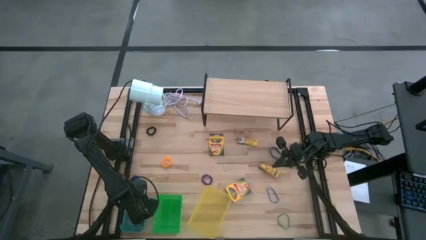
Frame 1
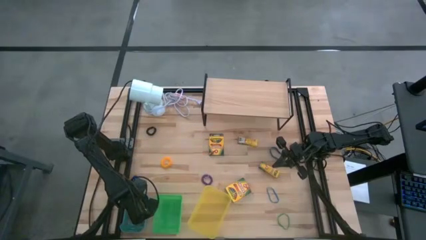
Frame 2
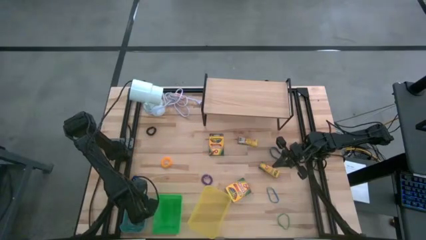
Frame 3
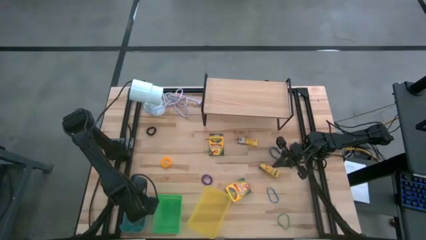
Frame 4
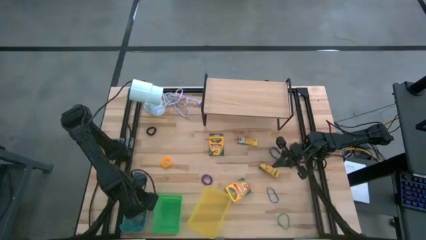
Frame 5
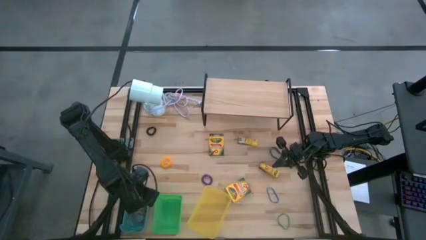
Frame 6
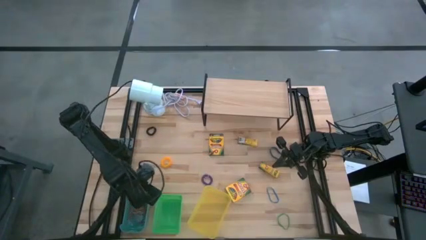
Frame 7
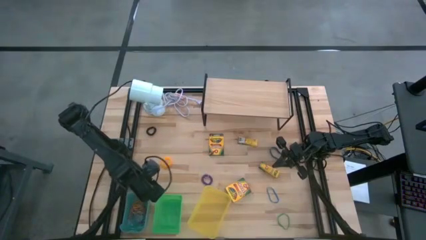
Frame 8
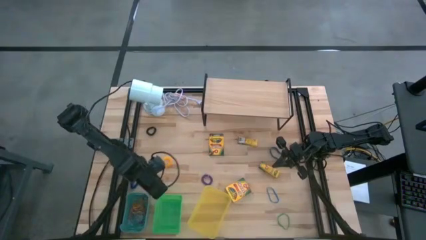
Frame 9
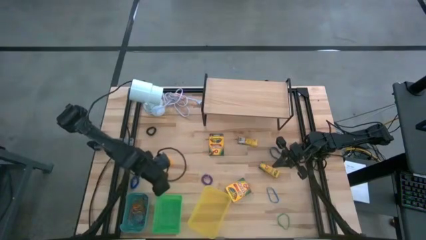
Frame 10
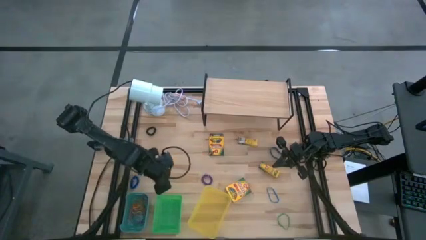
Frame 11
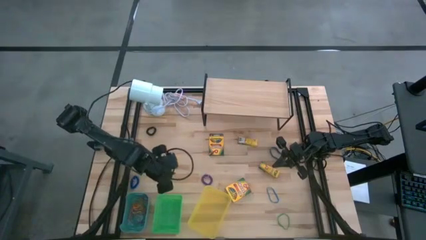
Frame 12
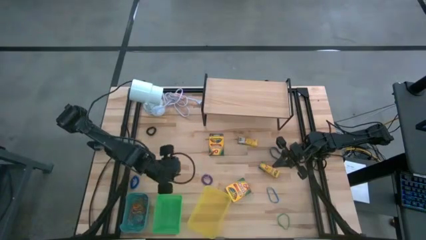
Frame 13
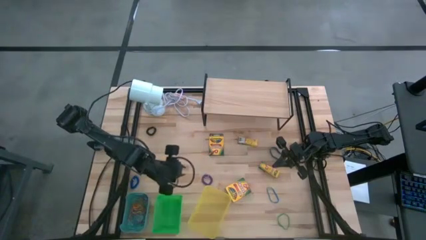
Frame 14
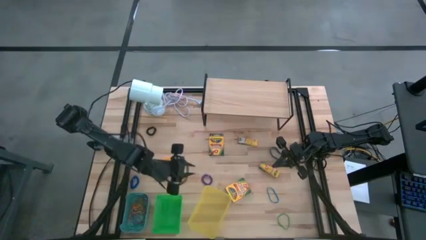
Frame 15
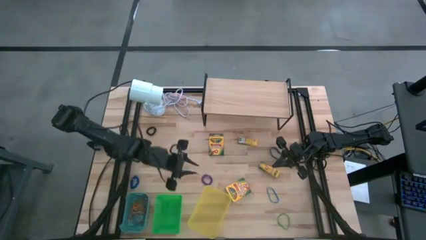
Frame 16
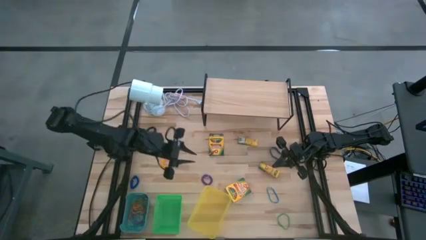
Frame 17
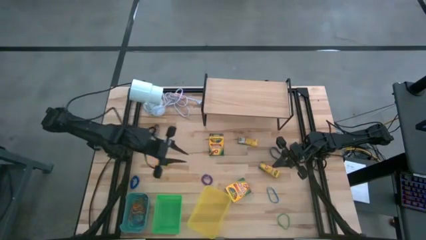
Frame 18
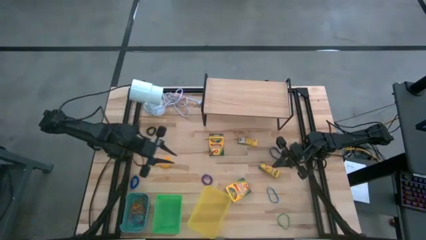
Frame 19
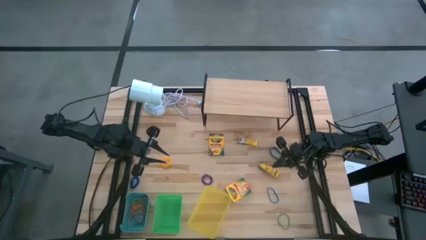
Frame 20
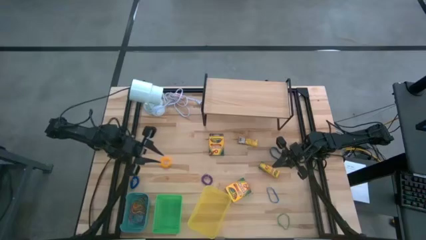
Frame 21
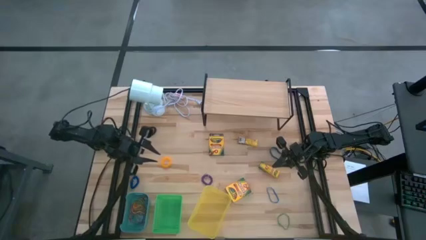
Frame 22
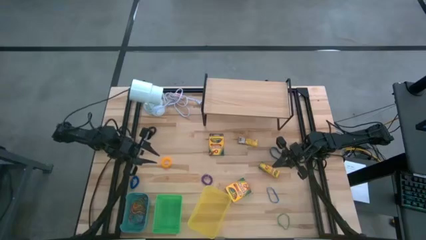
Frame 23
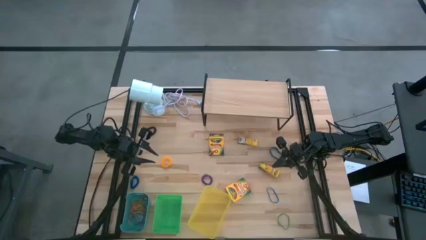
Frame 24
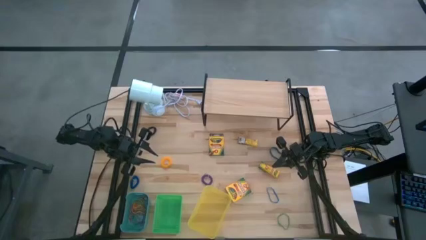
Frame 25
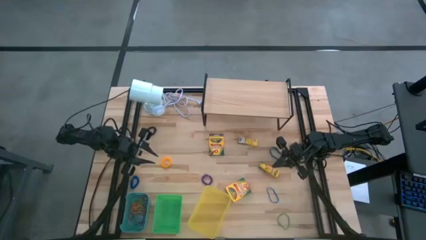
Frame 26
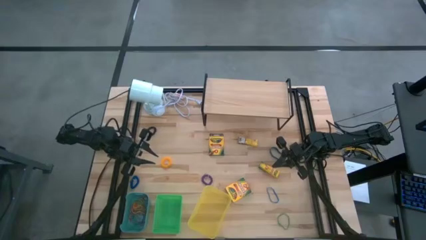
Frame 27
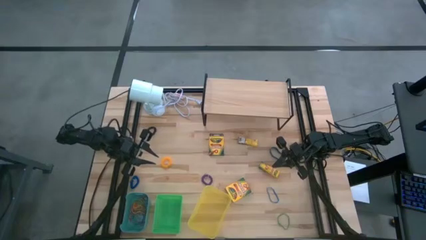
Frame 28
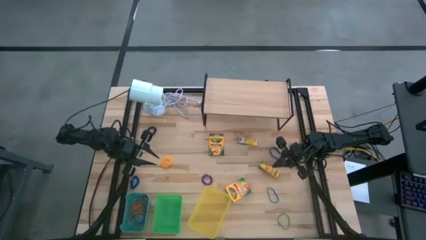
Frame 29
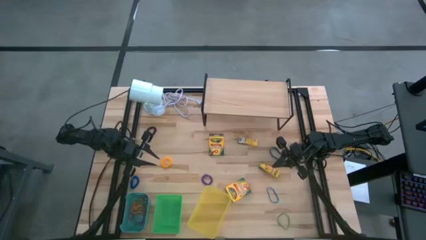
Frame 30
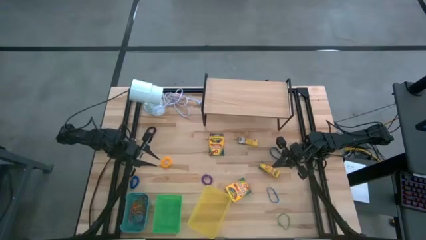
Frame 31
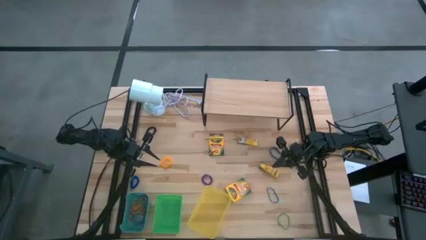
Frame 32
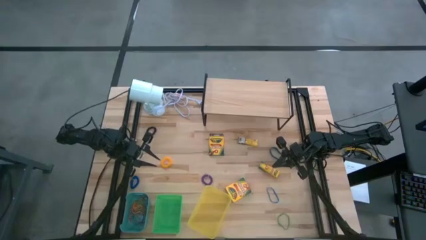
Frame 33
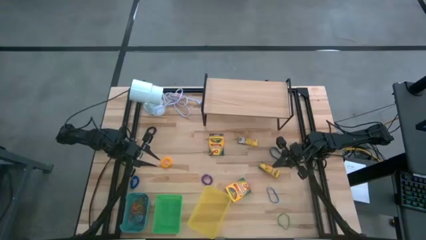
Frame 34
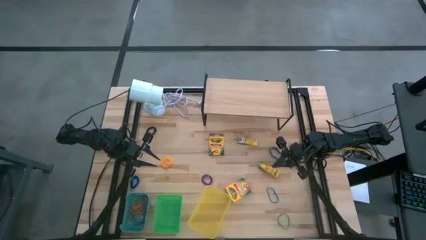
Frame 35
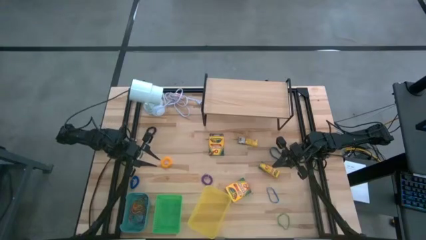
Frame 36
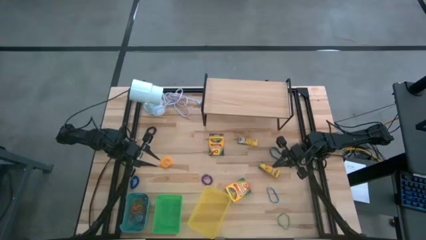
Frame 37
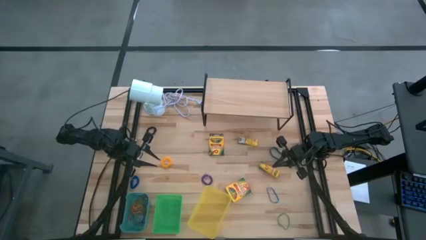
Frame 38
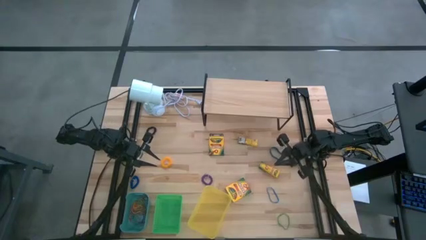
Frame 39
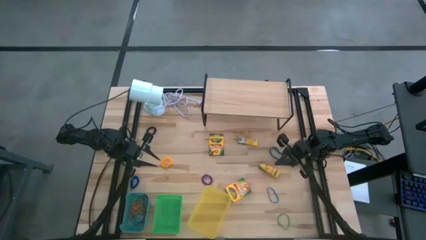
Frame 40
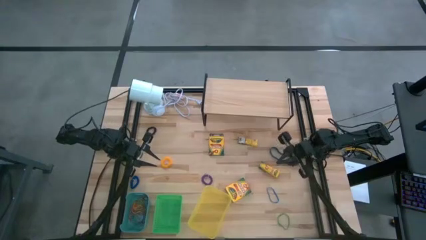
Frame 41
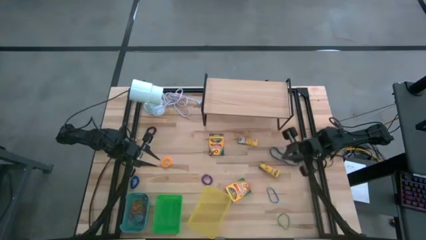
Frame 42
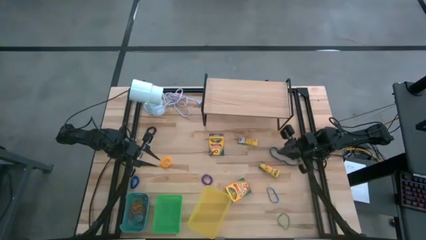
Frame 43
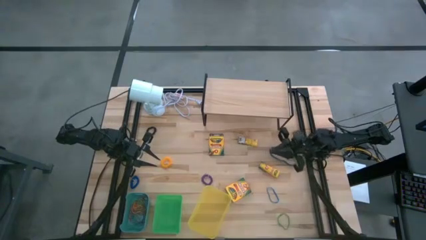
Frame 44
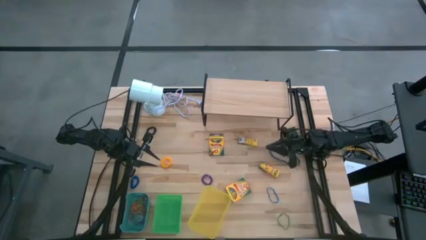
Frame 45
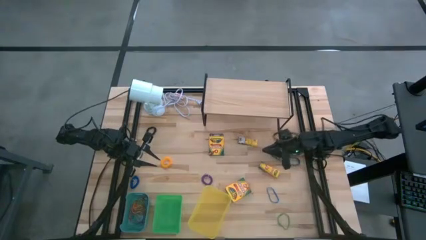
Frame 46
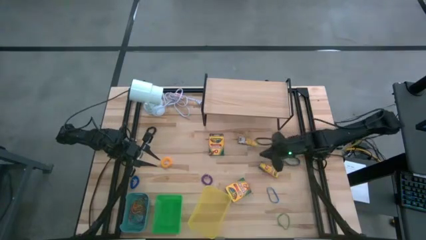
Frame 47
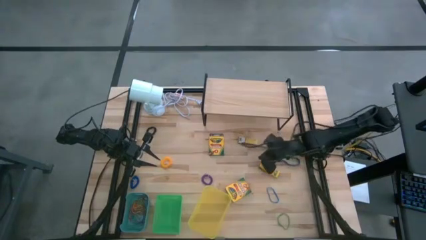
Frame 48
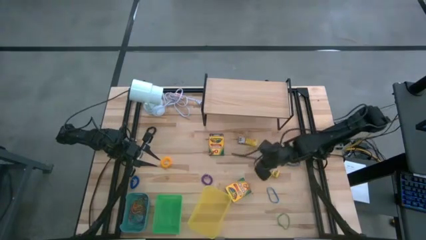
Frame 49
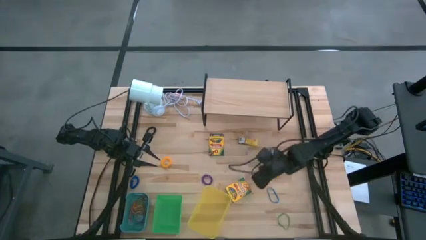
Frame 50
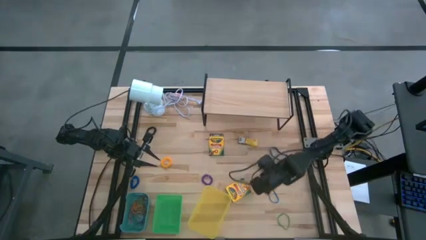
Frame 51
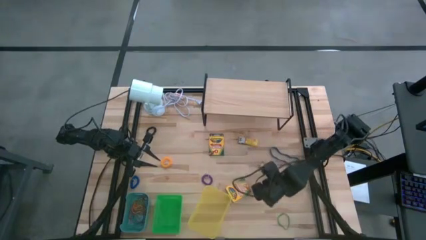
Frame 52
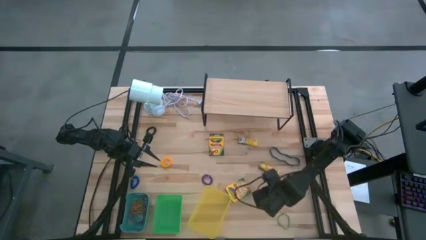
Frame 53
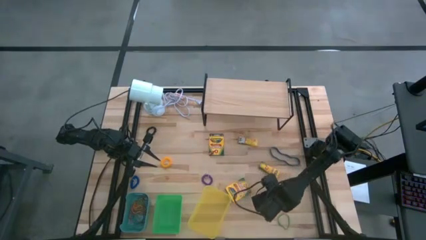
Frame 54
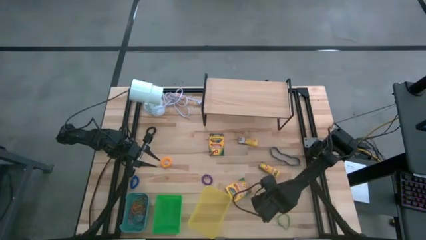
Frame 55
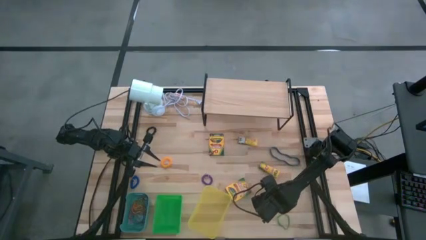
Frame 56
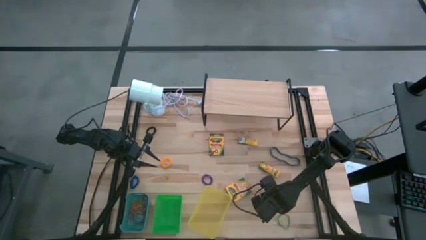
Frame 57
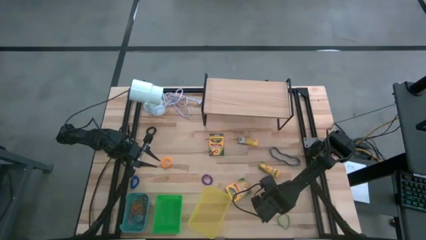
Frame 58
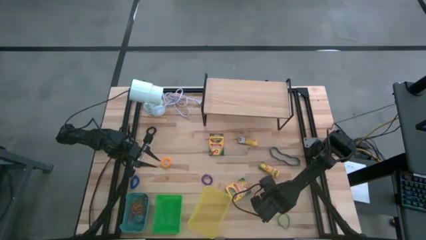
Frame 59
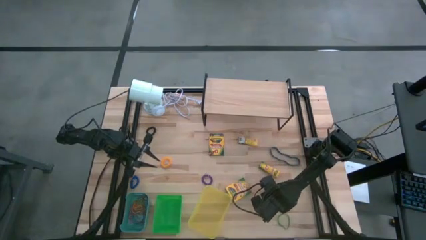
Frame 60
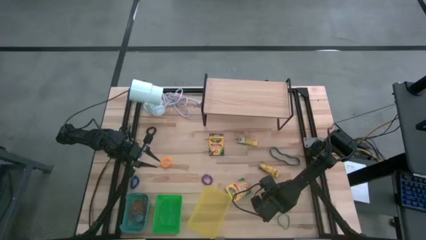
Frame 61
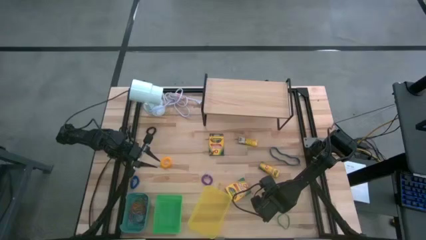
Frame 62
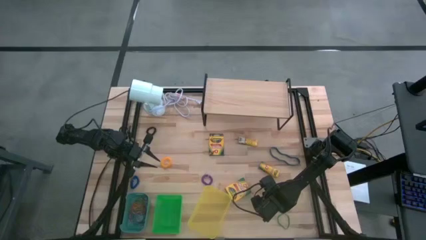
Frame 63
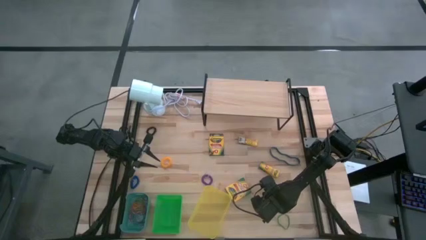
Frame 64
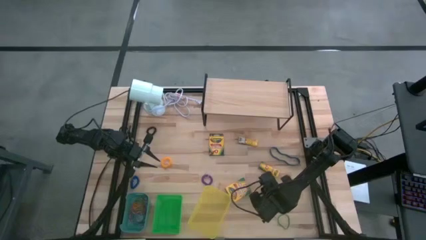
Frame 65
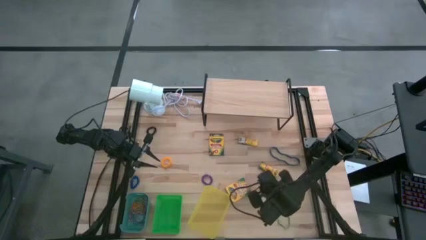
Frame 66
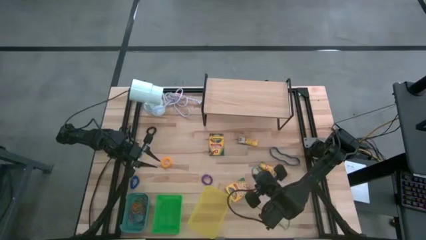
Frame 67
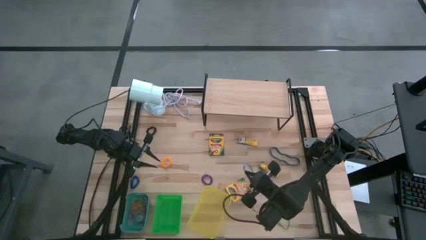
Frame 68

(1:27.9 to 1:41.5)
Task: Pick & Place Office Desk Supplies
Put the blue rubberband into the blue bin
